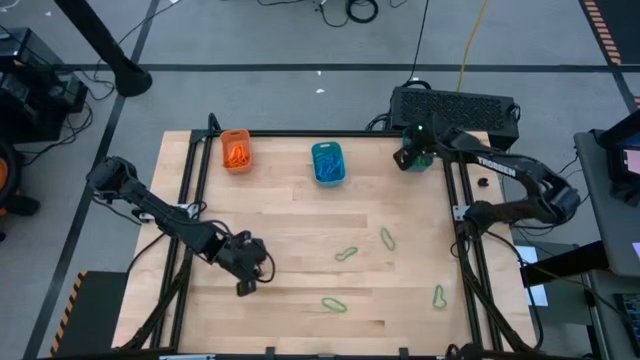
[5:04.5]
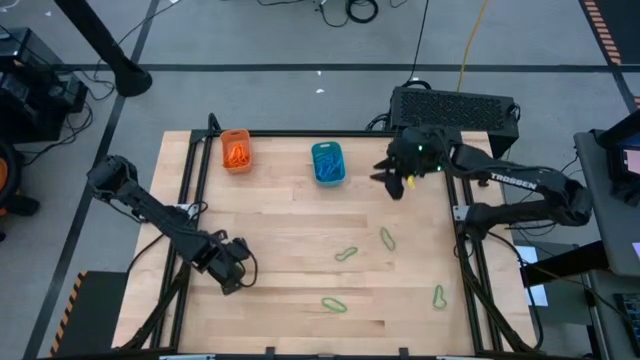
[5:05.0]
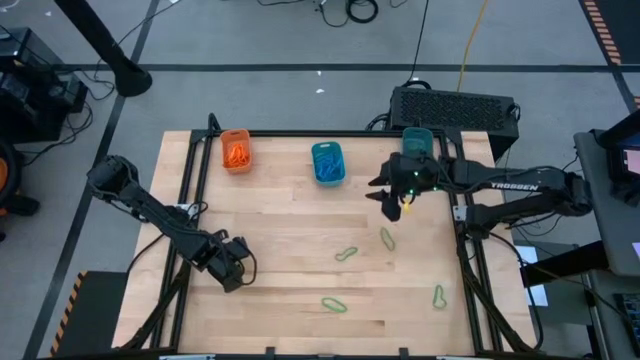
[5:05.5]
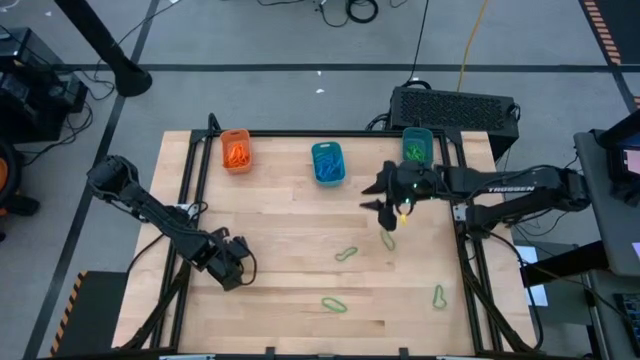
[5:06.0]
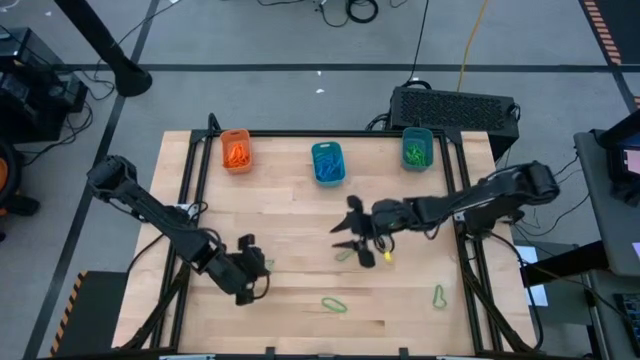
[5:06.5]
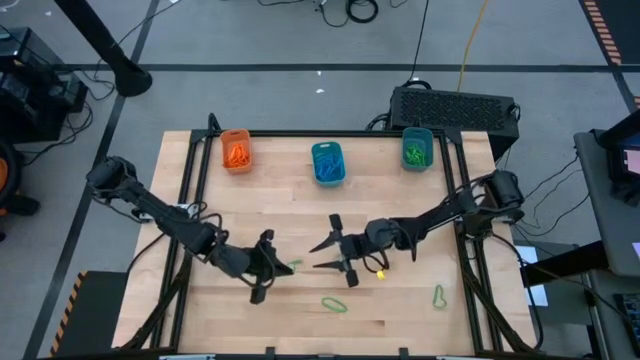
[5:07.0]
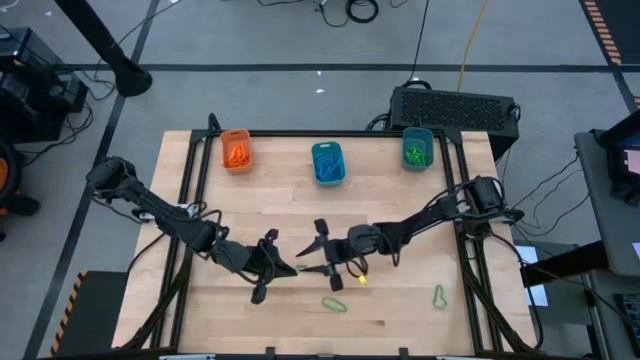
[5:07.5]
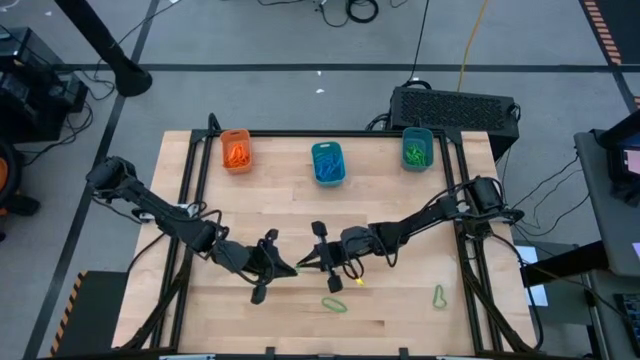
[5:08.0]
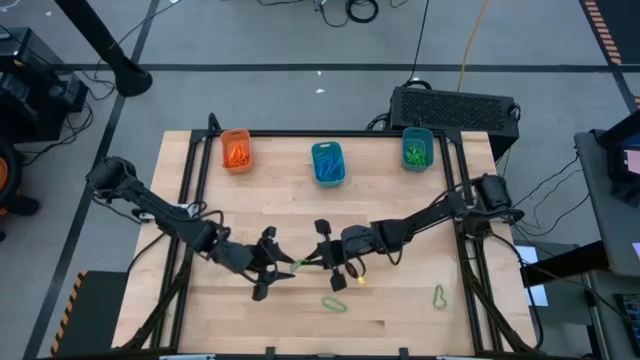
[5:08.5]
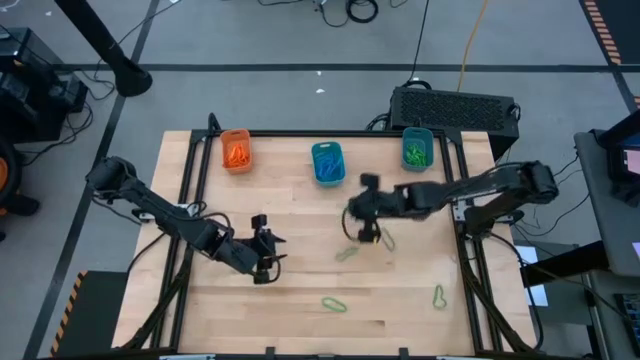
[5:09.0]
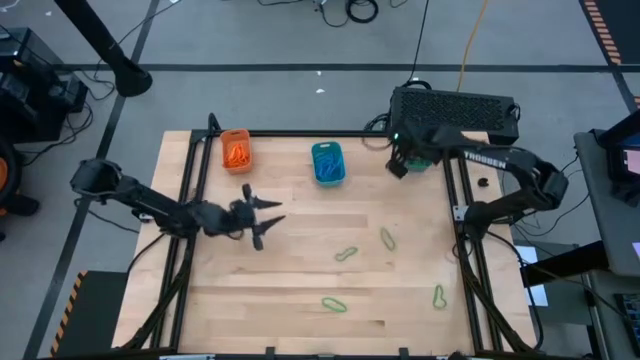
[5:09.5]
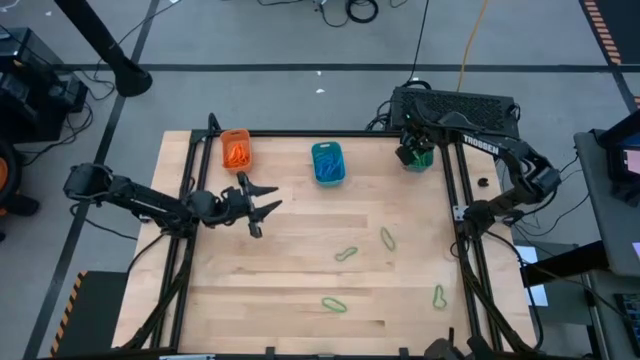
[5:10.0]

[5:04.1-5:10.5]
Task: Sort rubber bands into baskets
Put the green rubber band into the dark blue bin

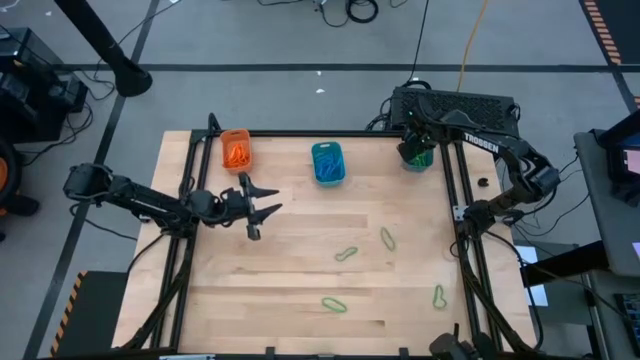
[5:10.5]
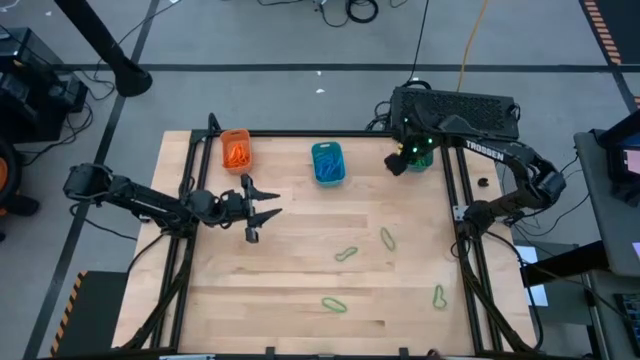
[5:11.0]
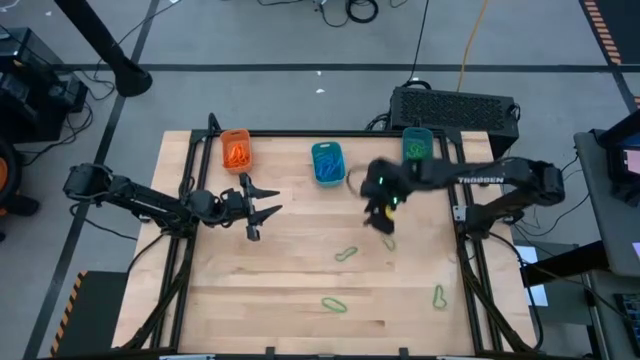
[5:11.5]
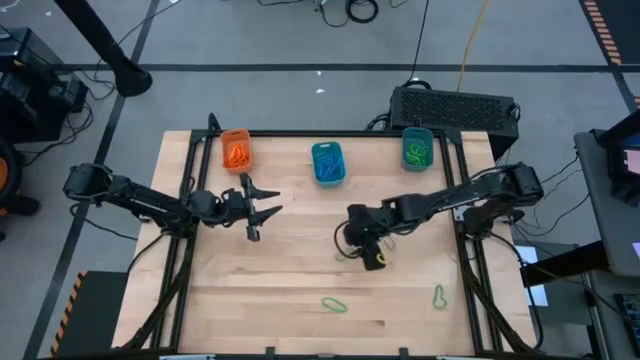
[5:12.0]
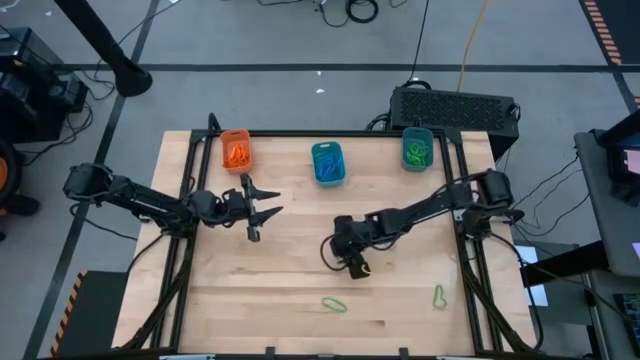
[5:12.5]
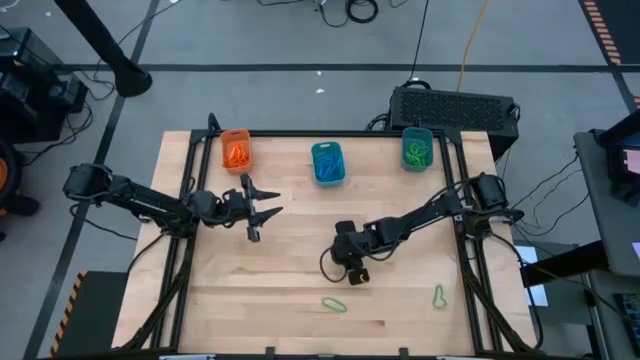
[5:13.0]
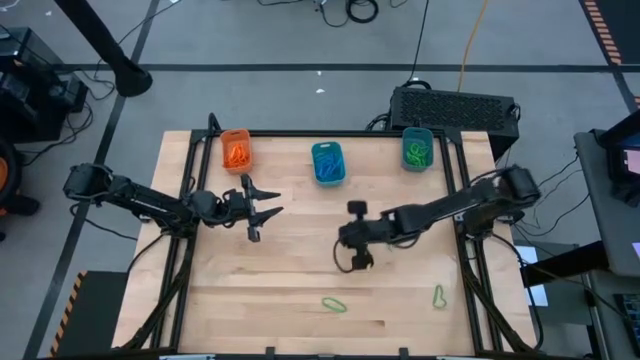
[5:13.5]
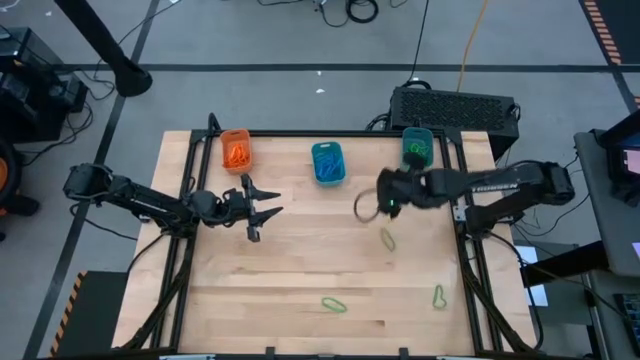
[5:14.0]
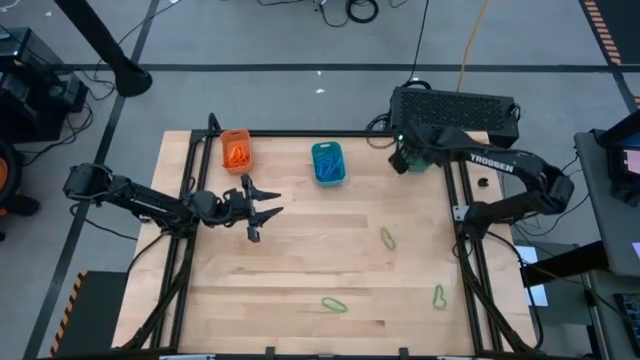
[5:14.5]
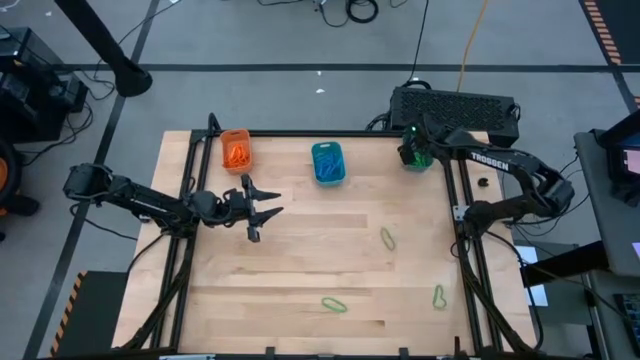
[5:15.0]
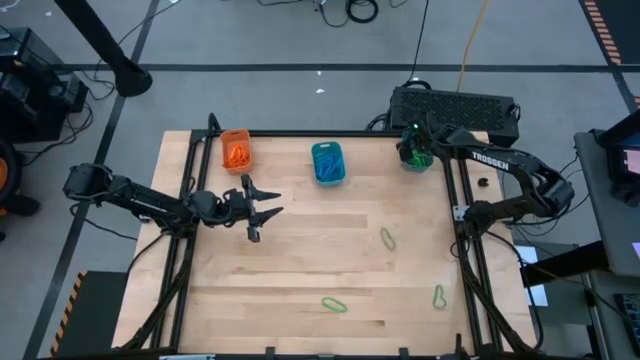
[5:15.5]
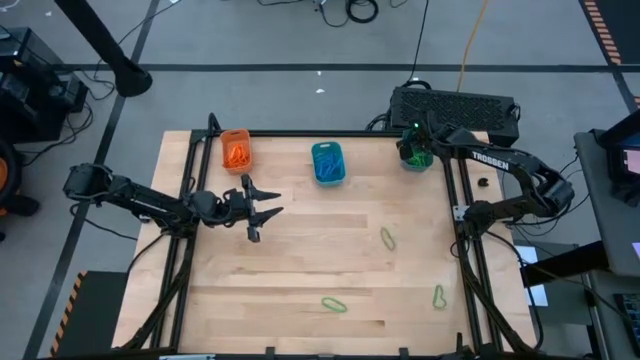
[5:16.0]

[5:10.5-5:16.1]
Put the green rubber band into the dark blue bin

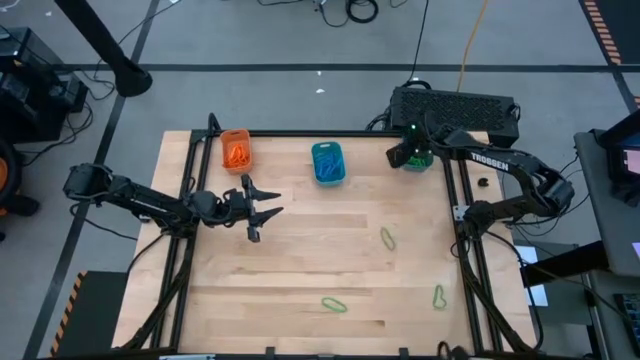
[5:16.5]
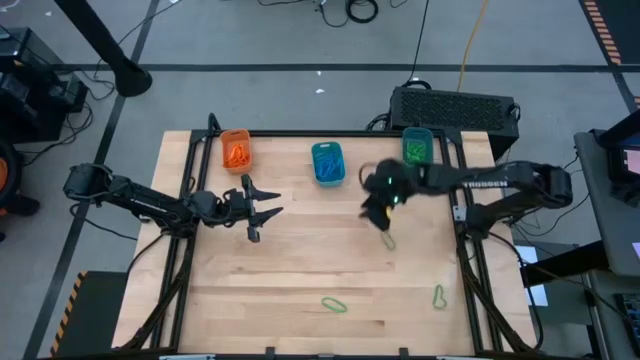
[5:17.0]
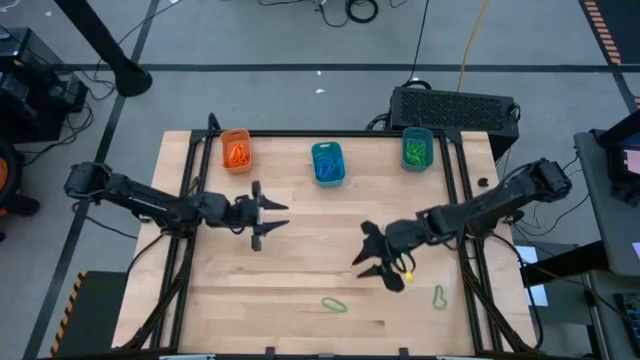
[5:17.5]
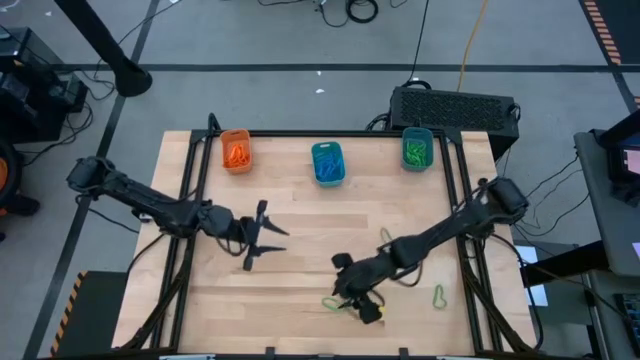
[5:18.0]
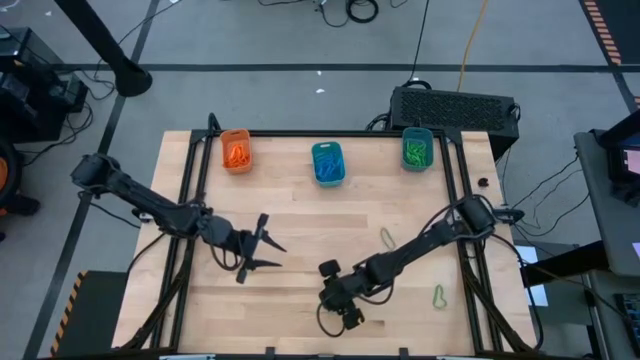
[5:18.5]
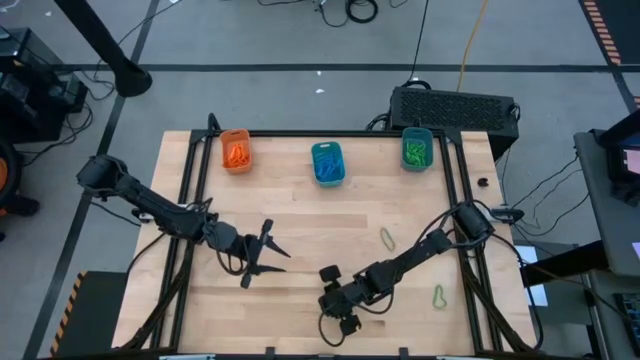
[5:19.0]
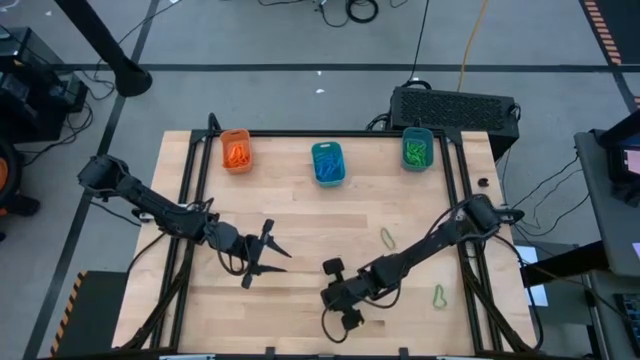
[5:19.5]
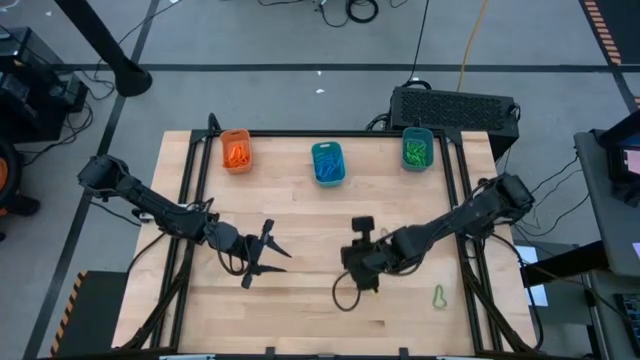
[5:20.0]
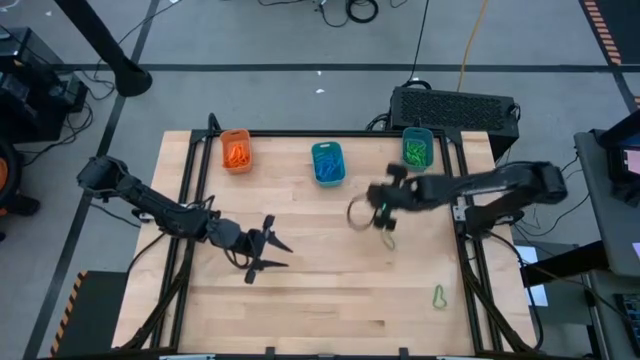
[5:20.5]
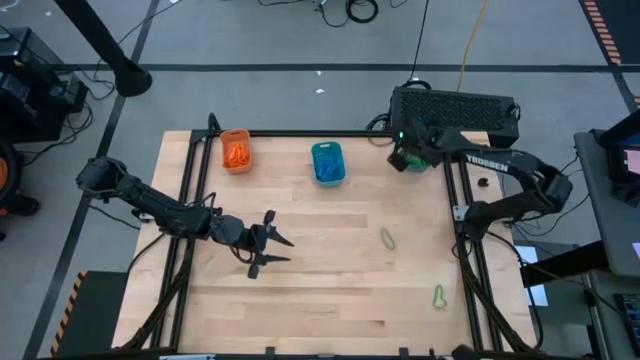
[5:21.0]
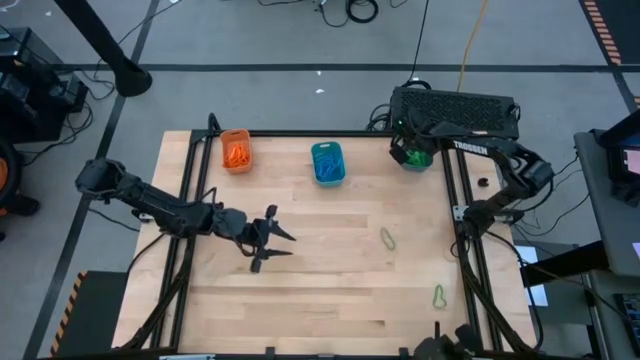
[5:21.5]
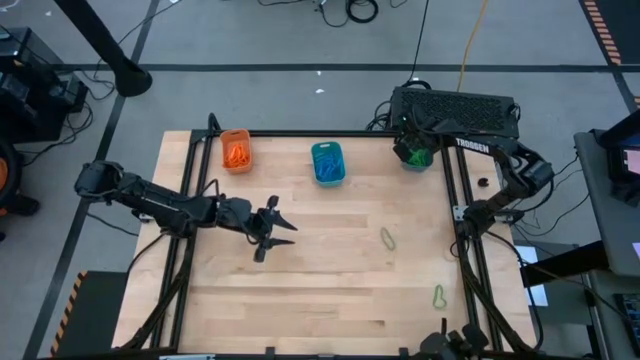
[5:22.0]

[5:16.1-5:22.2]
Put the green rubber band into the dark blue bin

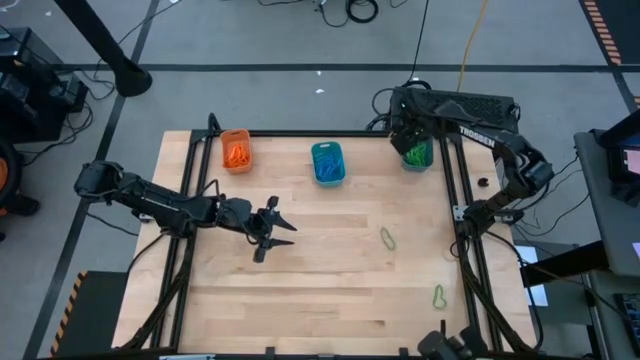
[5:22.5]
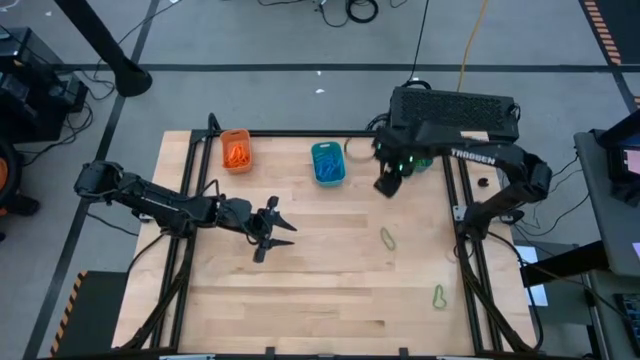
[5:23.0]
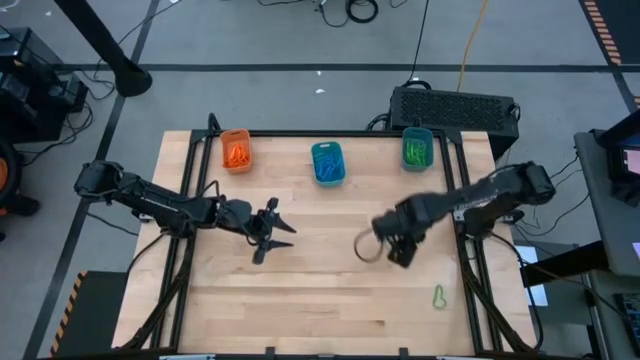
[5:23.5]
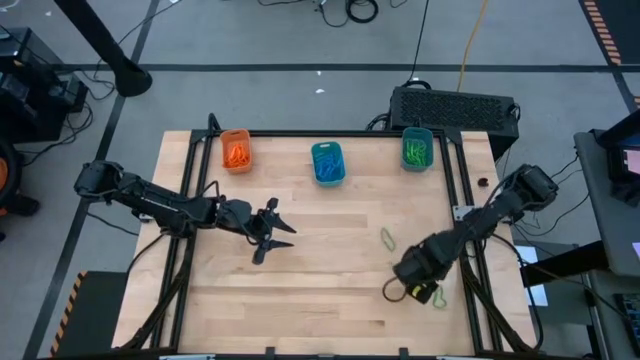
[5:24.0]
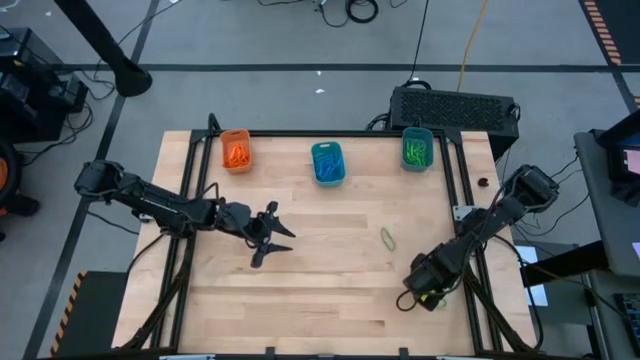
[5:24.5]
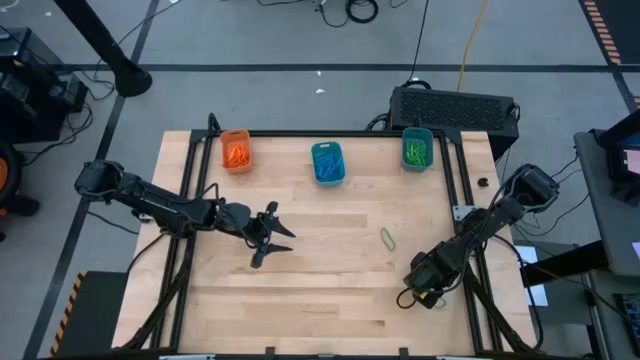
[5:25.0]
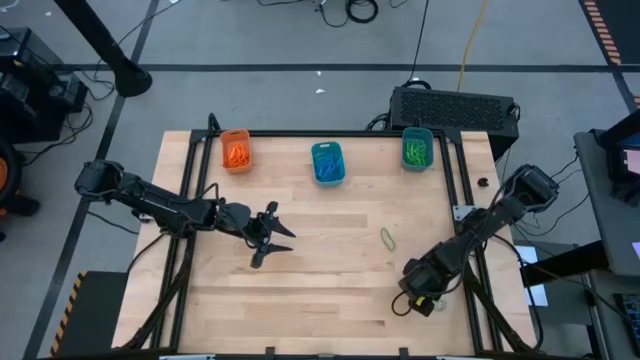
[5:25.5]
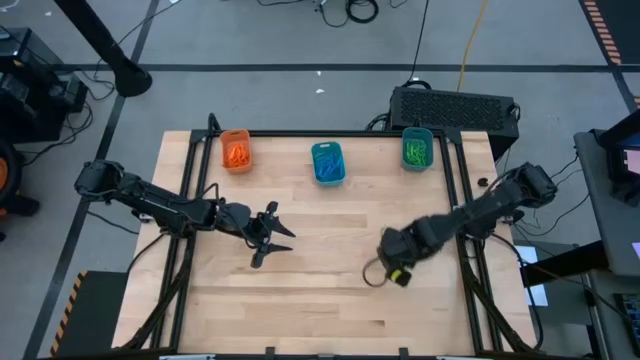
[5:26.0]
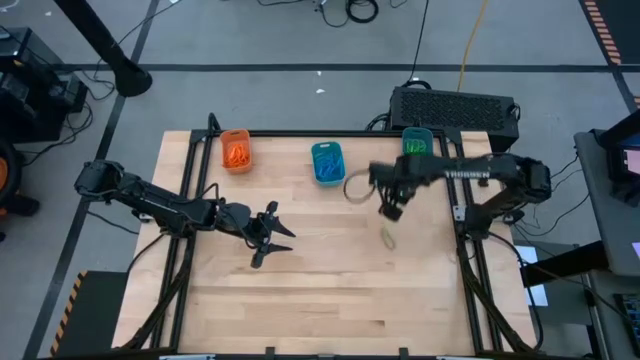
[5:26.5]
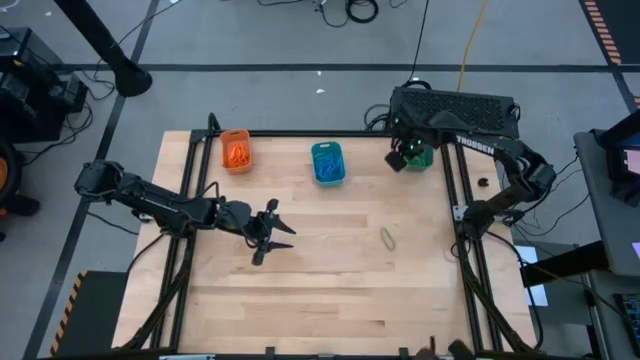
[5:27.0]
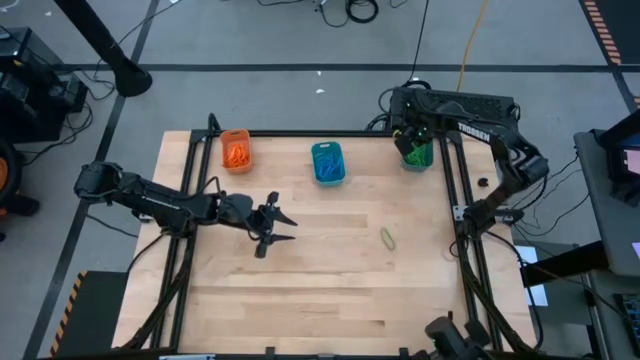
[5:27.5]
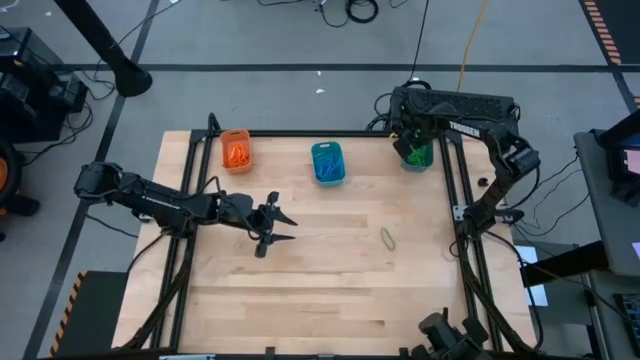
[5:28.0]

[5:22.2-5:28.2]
Put the green rubber band into the dark blue bin
